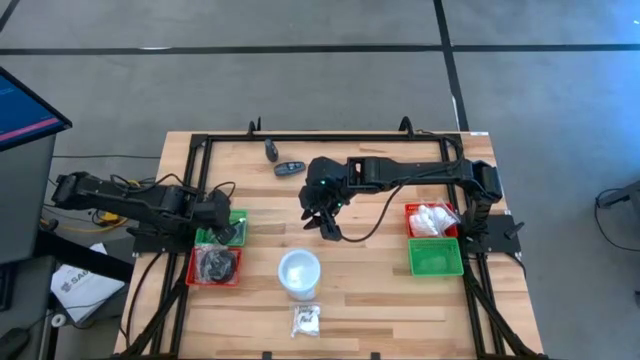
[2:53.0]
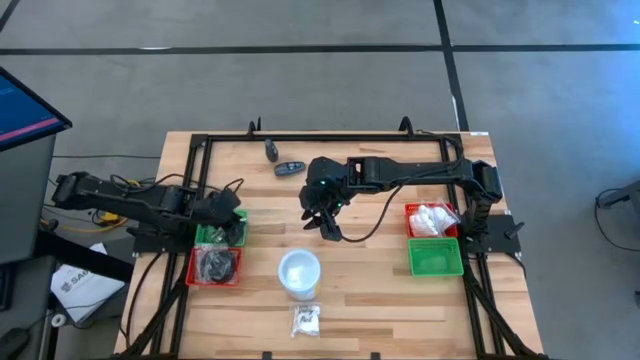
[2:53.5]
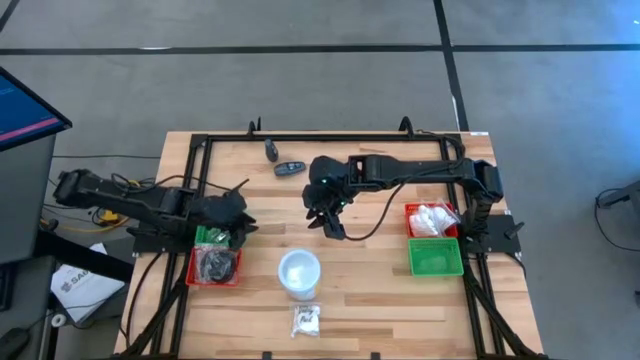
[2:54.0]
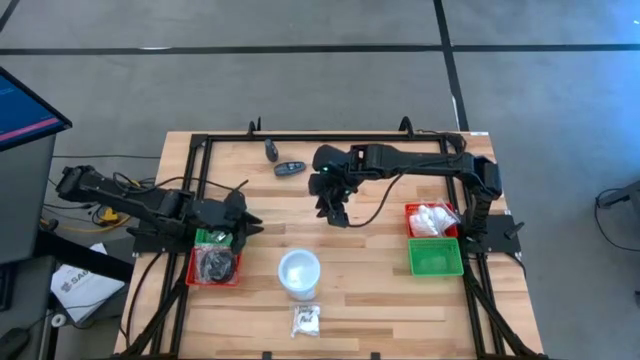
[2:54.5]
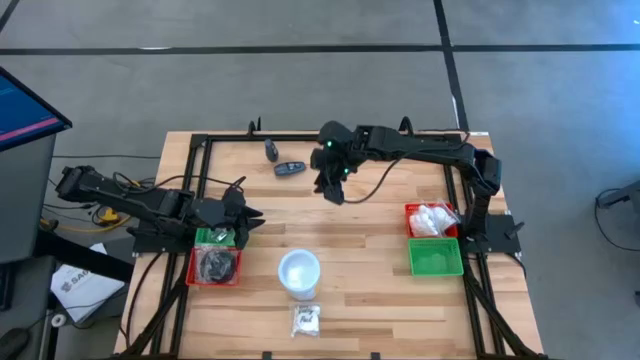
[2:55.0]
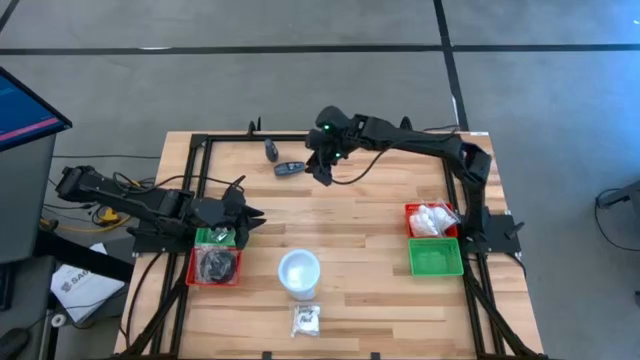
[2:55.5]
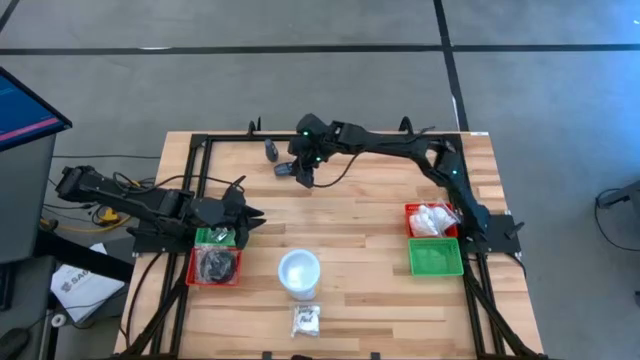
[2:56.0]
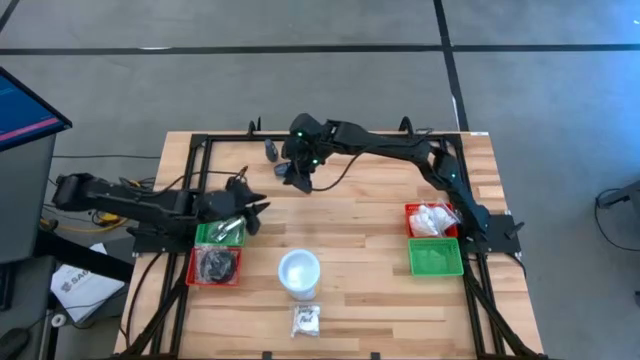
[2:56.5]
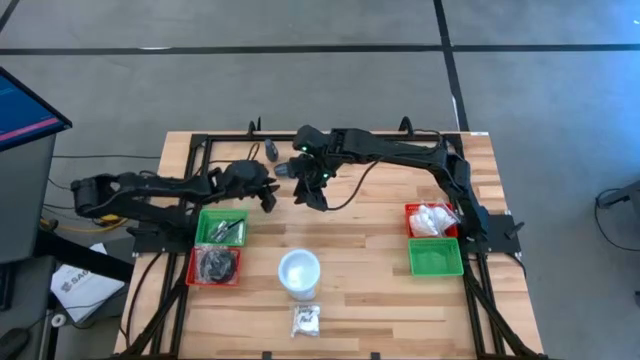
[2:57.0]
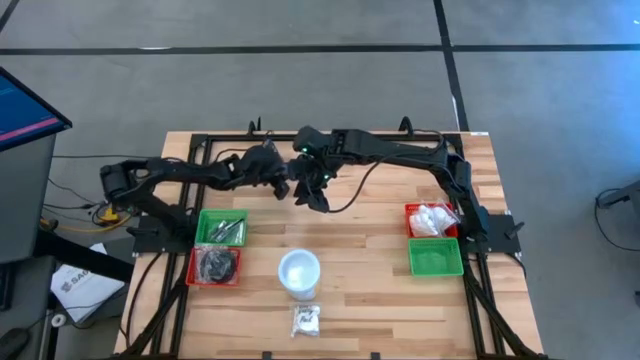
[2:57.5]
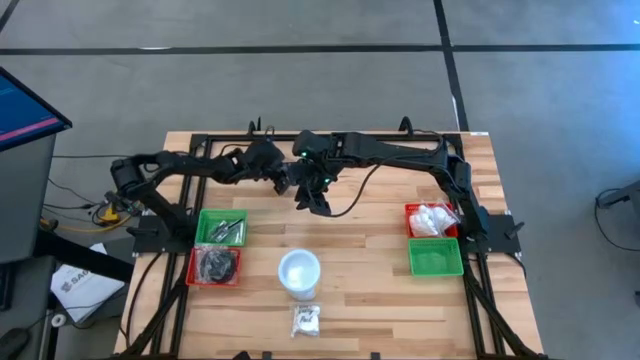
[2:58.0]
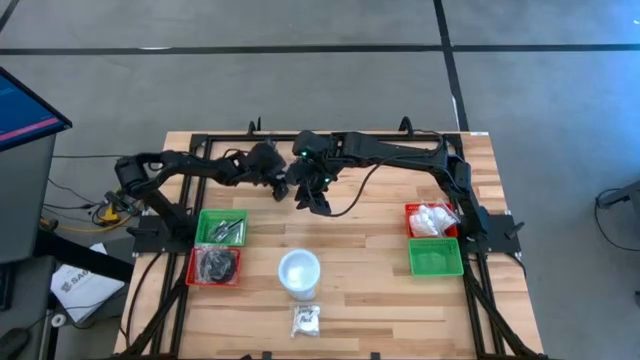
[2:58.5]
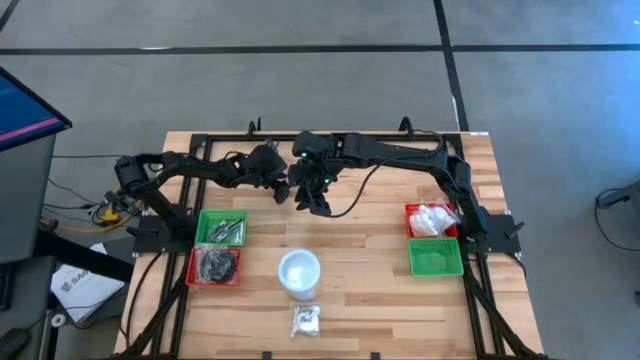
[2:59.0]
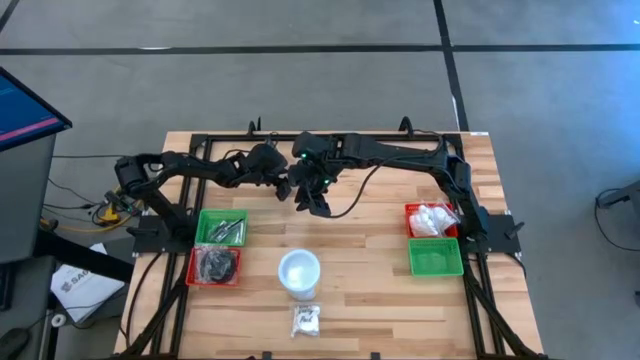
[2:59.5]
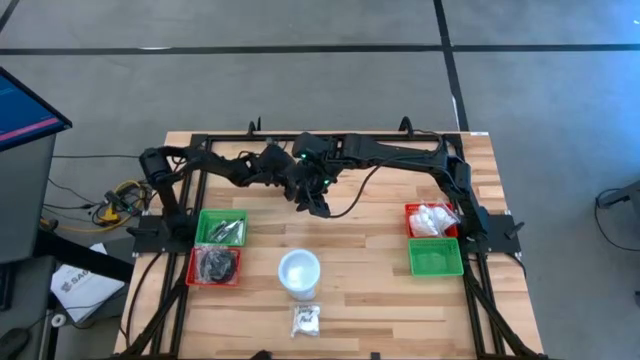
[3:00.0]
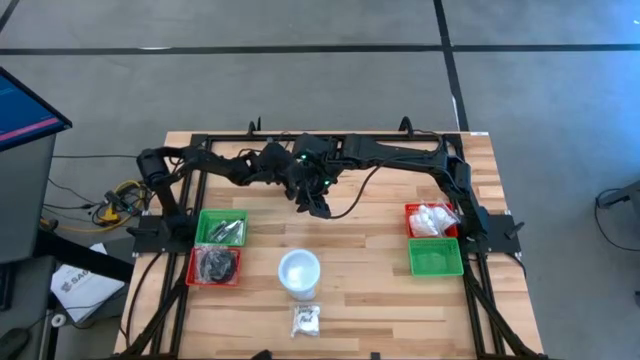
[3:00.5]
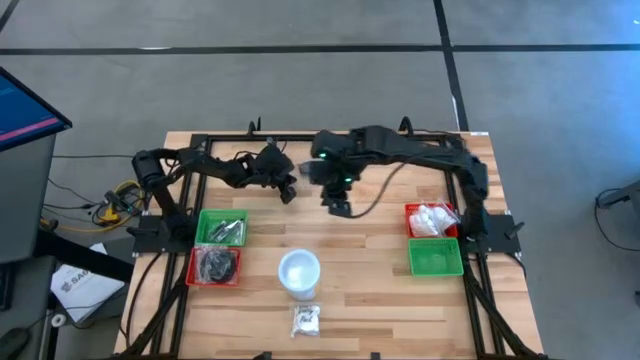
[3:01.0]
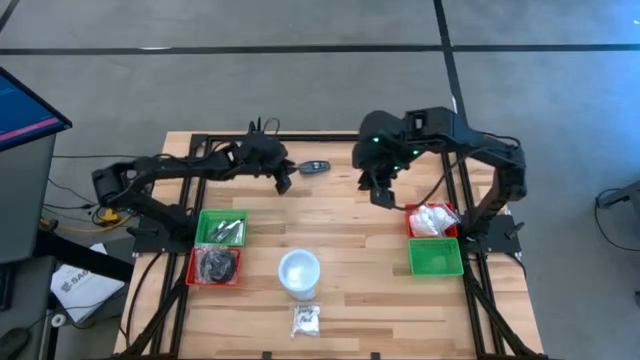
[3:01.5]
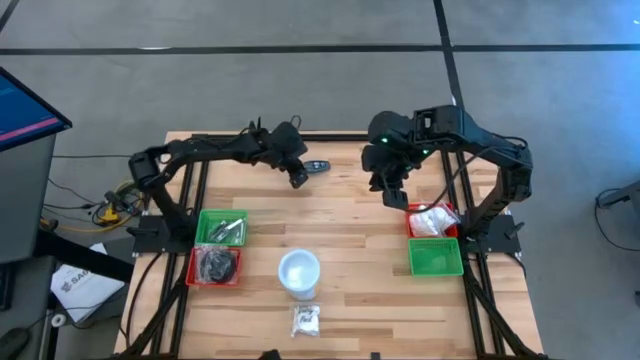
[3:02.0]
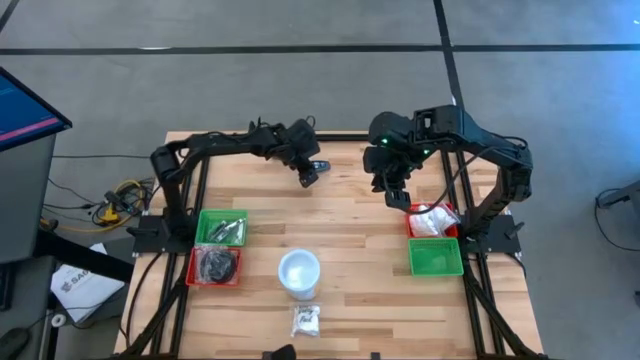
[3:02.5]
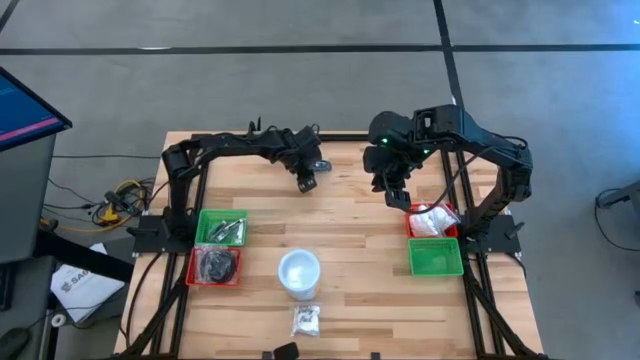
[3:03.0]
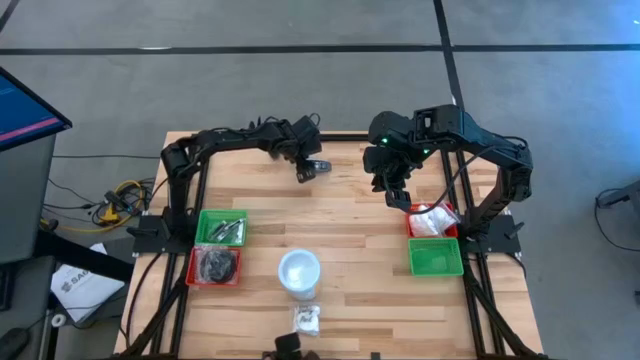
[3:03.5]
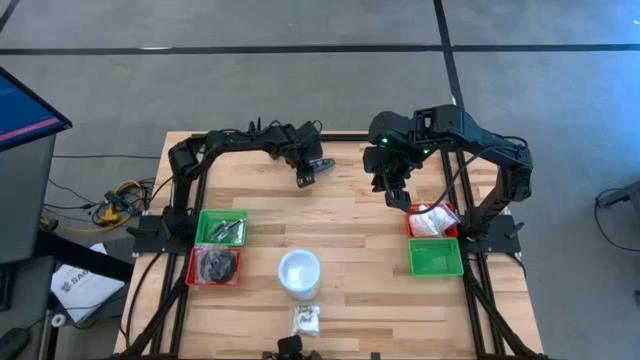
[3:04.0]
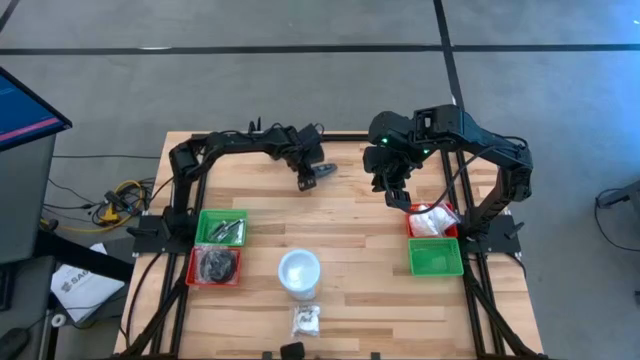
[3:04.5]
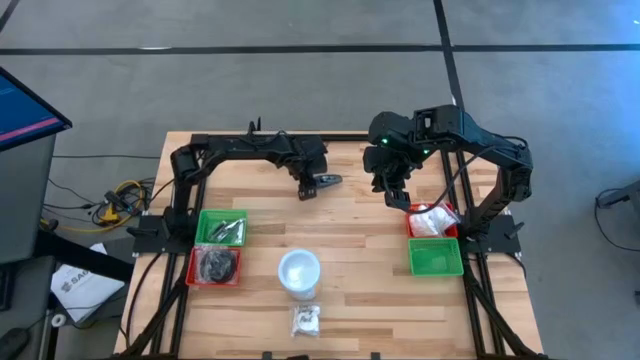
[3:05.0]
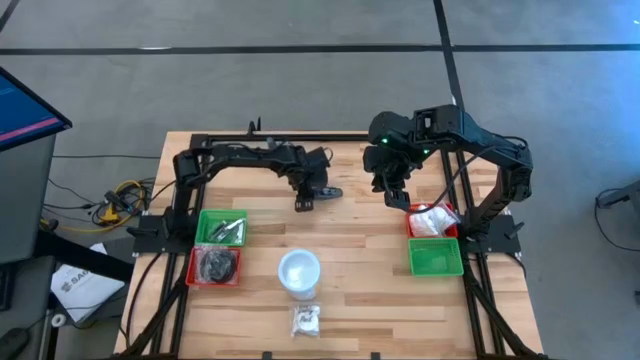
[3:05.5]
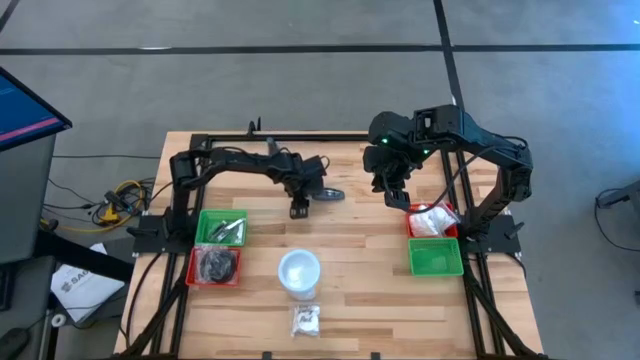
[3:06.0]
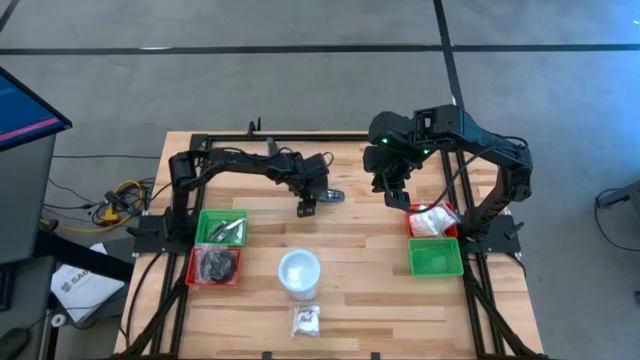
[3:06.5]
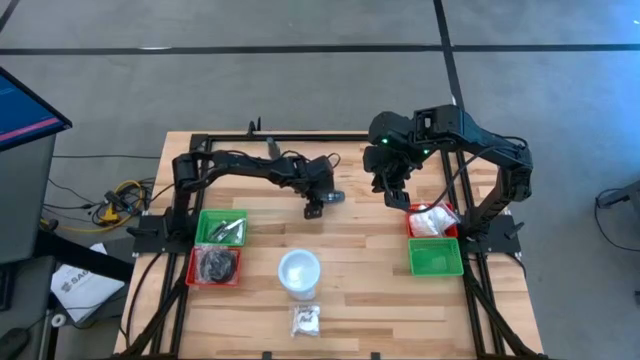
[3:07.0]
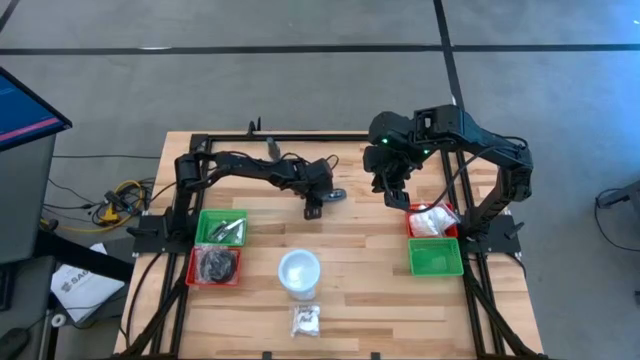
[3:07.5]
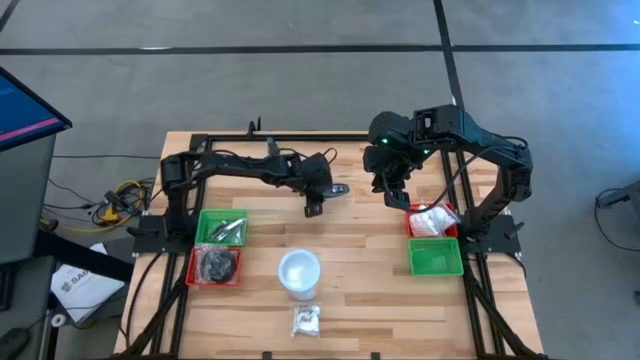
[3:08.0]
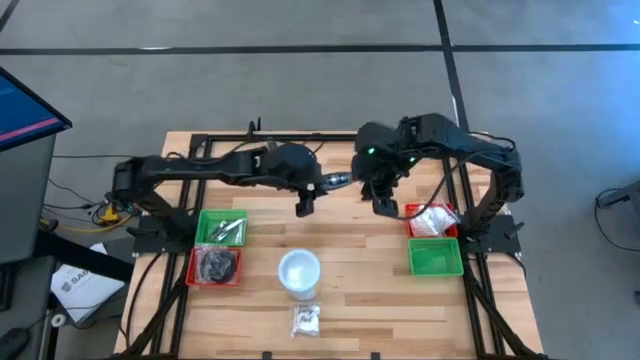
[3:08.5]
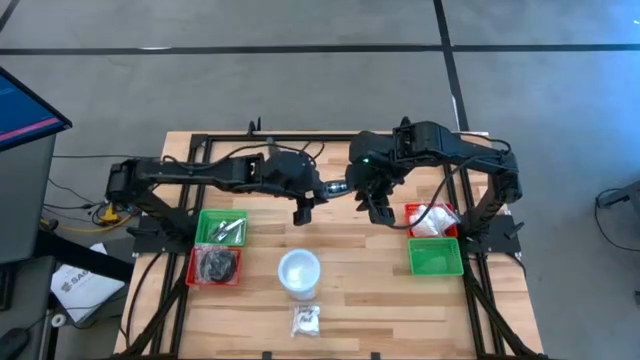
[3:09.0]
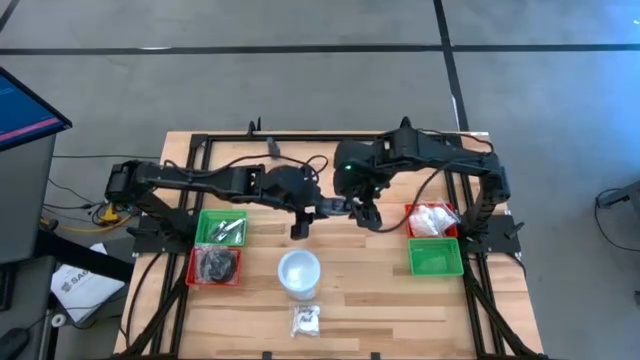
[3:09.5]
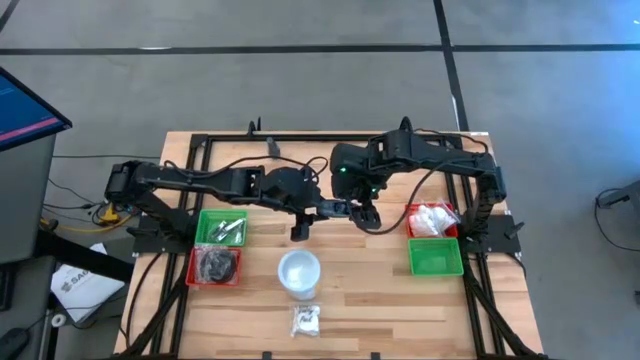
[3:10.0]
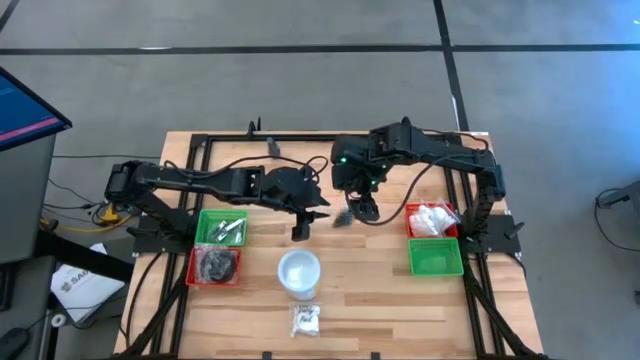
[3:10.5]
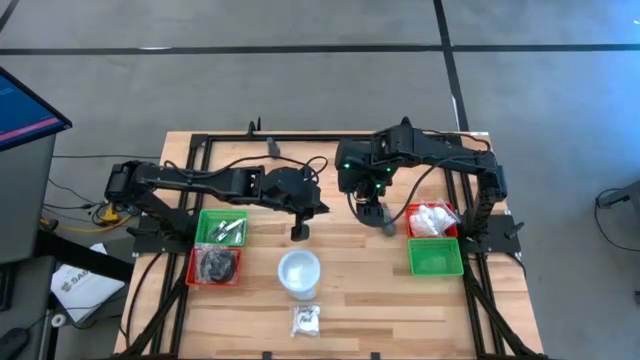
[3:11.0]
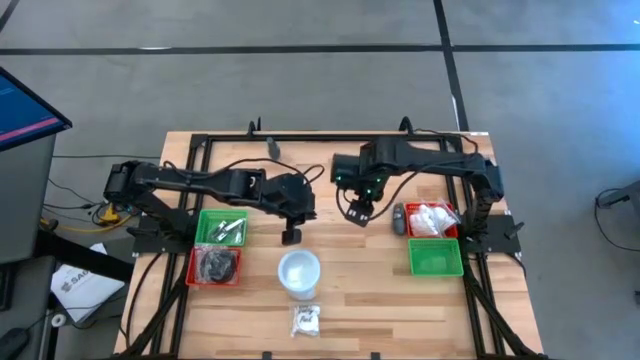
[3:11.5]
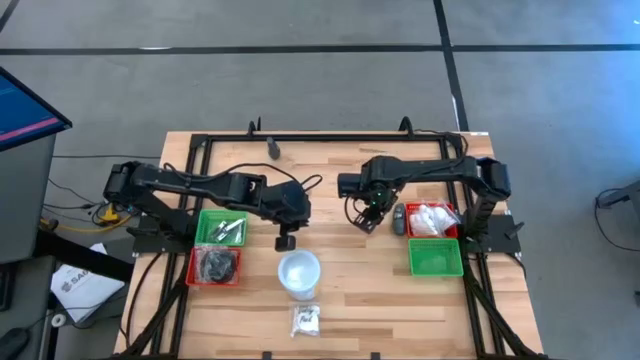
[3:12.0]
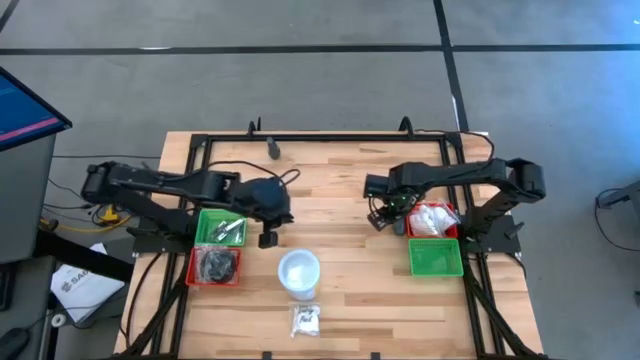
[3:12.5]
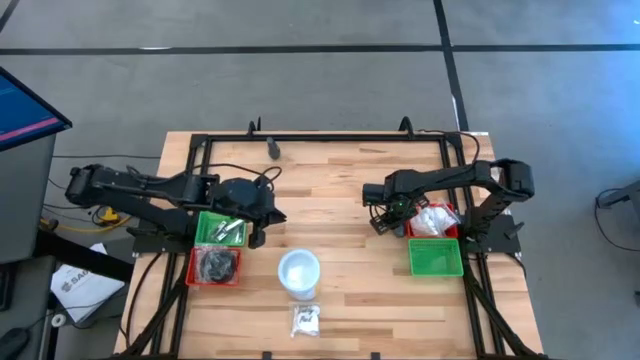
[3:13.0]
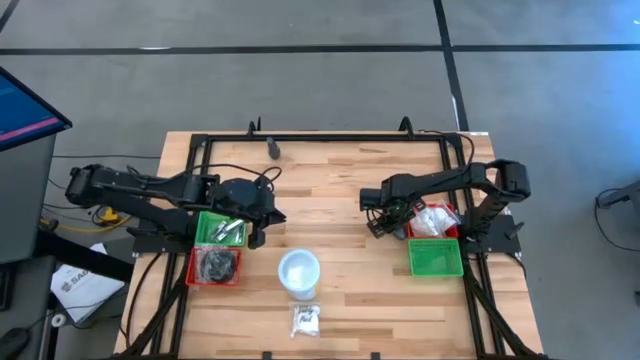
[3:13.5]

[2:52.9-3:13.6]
Task: Pick & Place Travel size toiletries
Put the bottom gray deodorant into the right green bin
